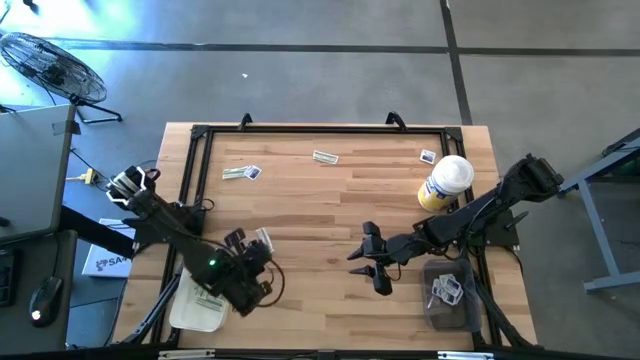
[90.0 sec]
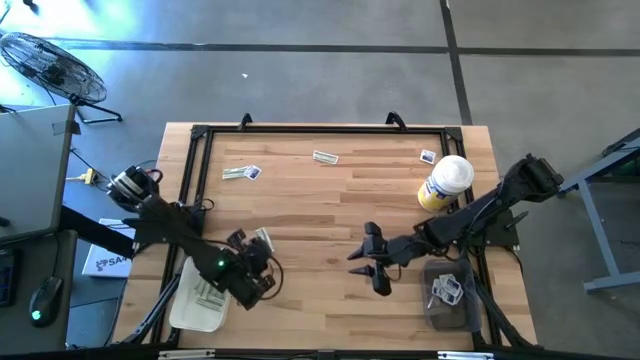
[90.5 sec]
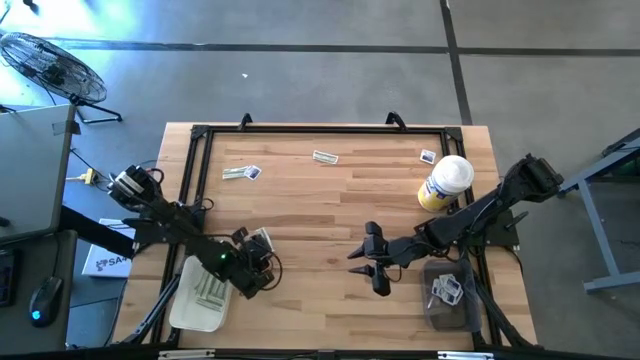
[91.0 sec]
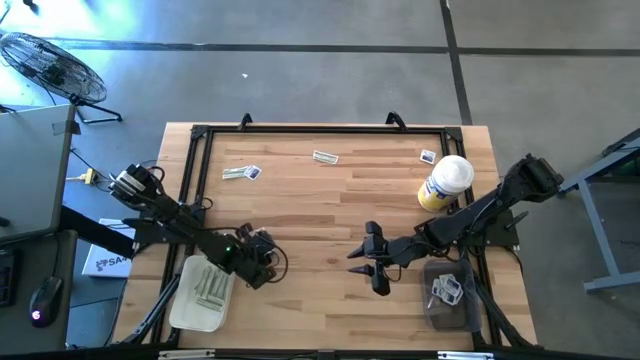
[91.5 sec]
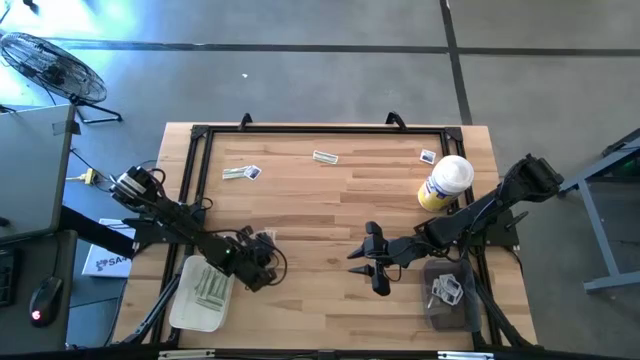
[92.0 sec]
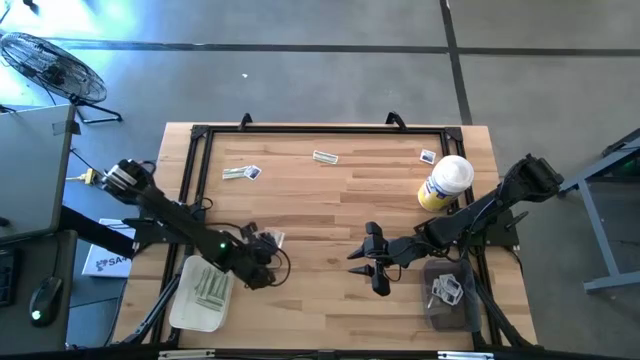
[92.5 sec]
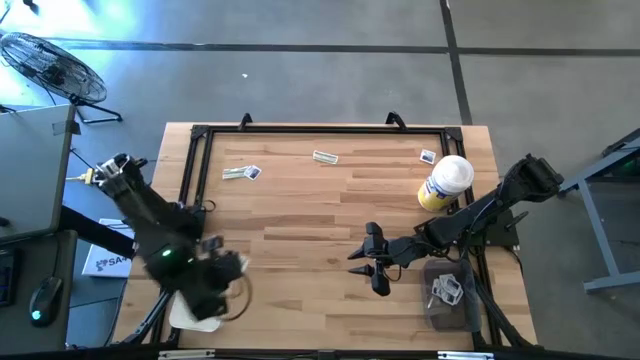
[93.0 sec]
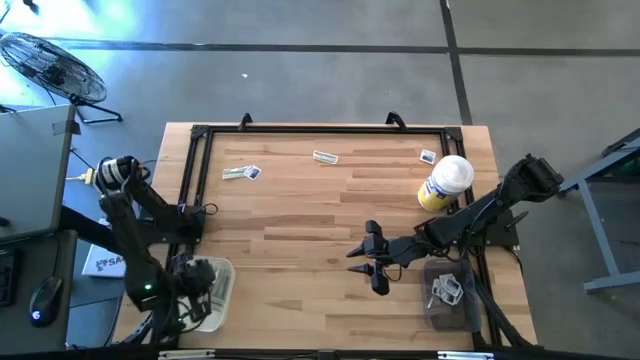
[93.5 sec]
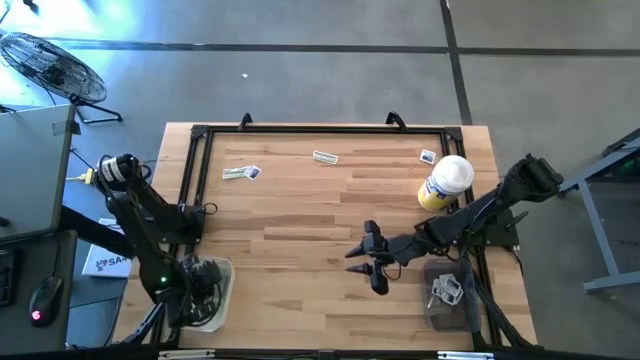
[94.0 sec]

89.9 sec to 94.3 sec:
Task: Pick & Place First Aid Supplies
Put the green bandage into the white bin

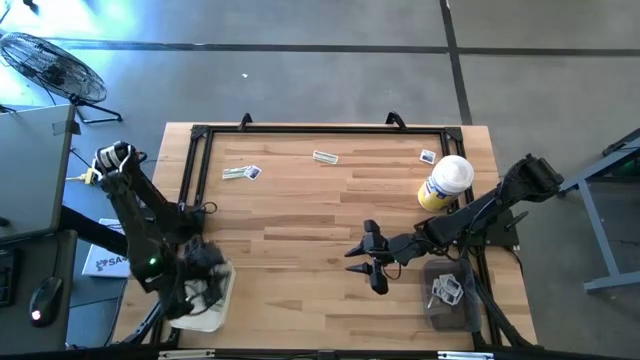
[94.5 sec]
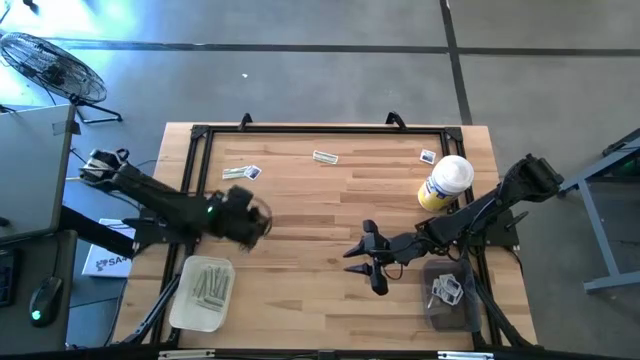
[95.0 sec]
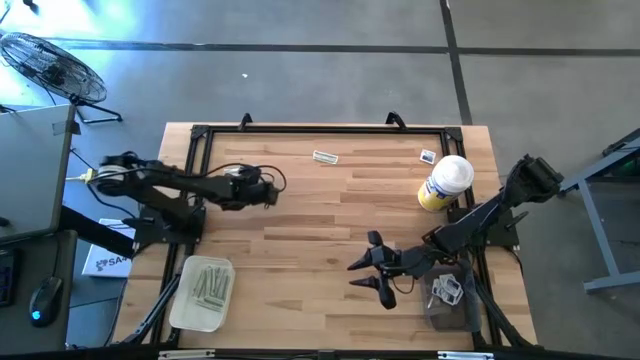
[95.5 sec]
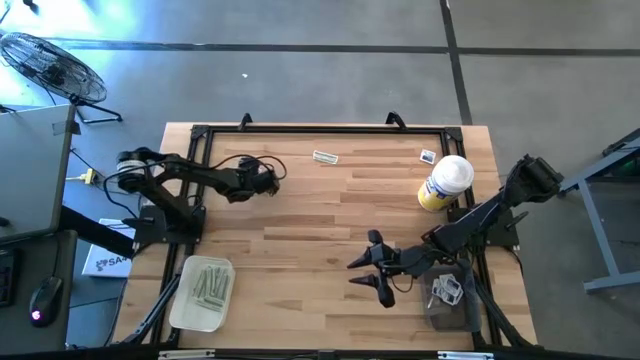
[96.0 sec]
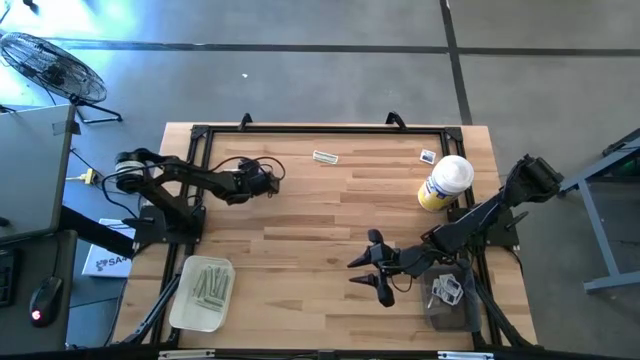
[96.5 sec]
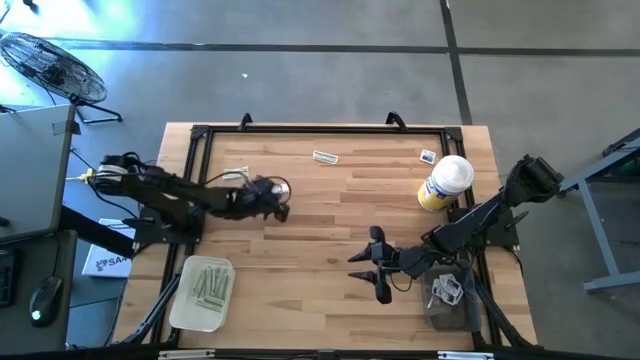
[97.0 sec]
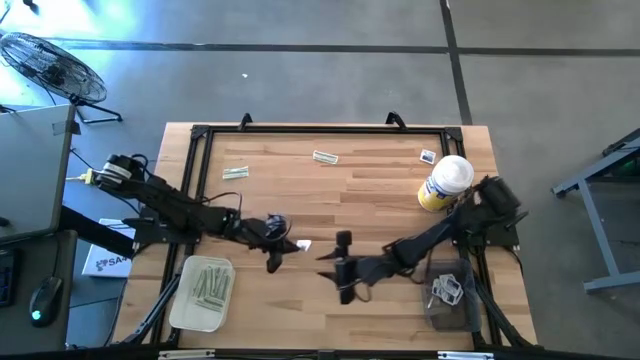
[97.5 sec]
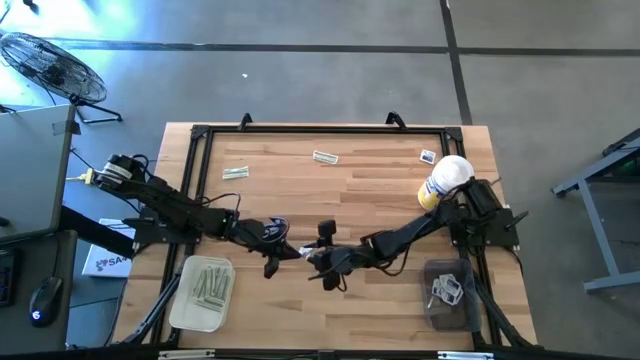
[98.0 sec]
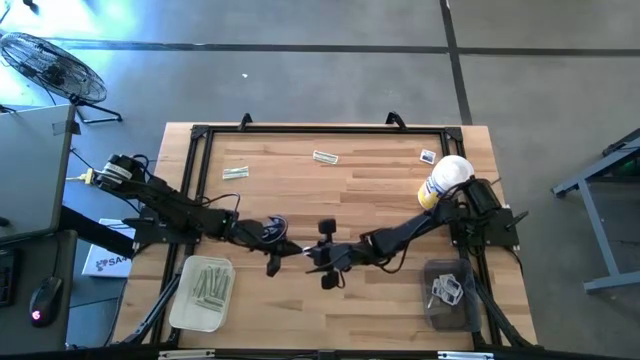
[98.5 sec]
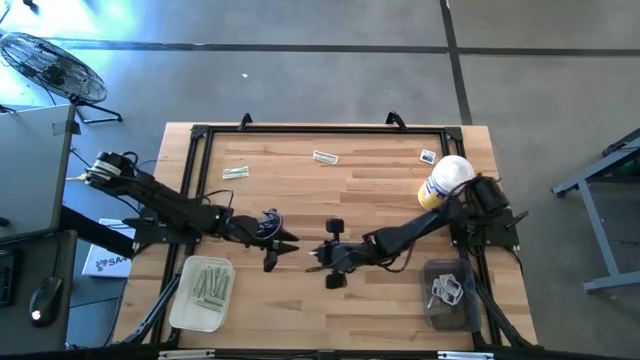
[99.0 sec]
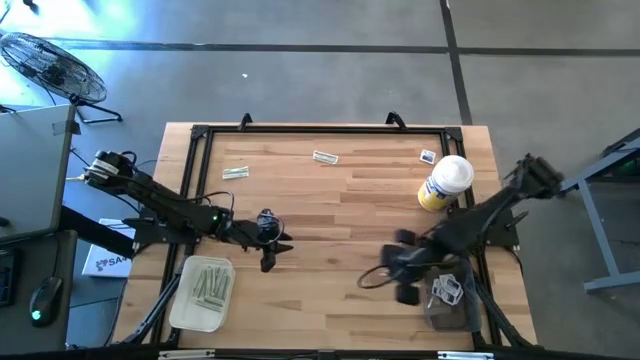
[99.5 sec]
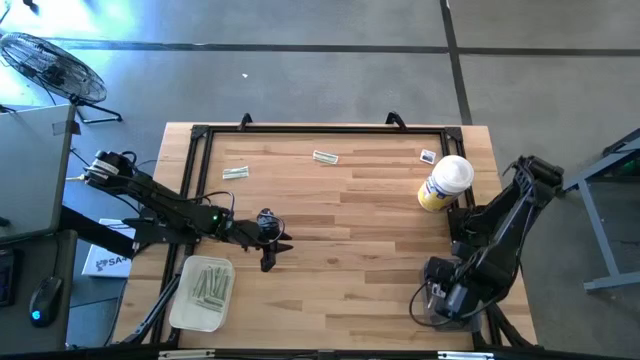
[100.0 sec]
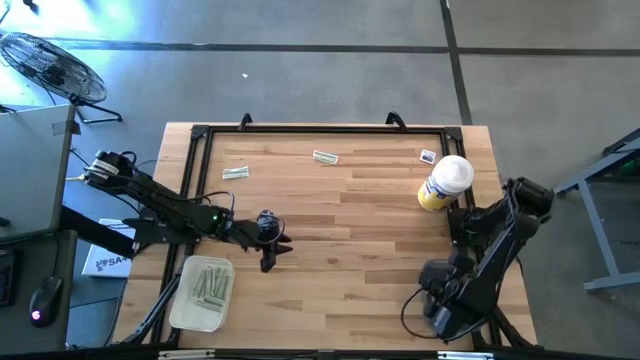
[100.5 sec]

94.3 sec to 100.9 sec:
Put the blue alcohol pad into the black bin

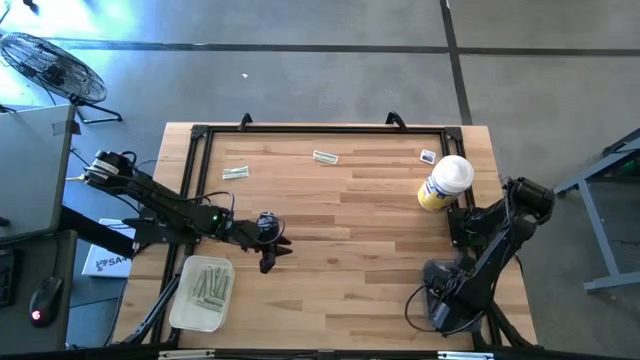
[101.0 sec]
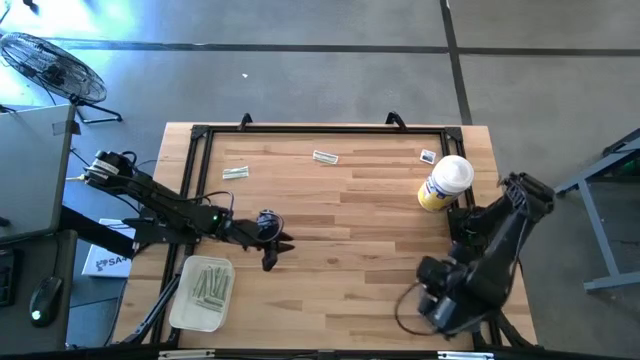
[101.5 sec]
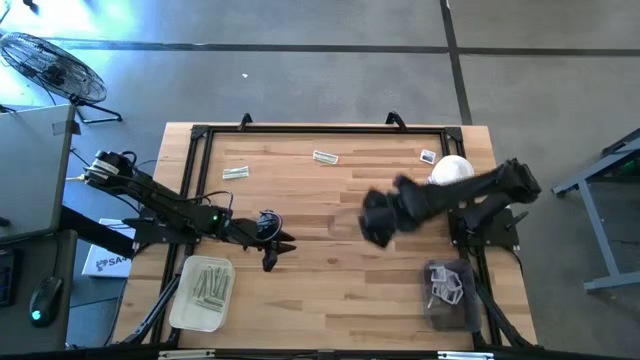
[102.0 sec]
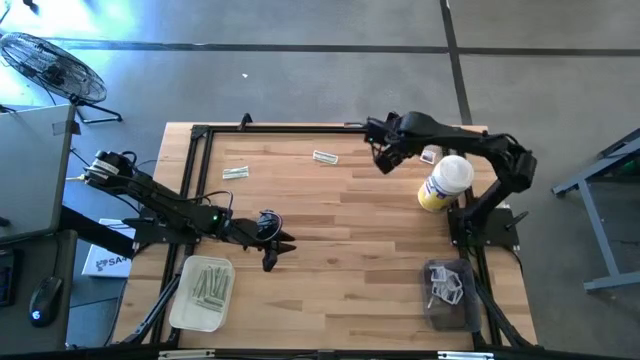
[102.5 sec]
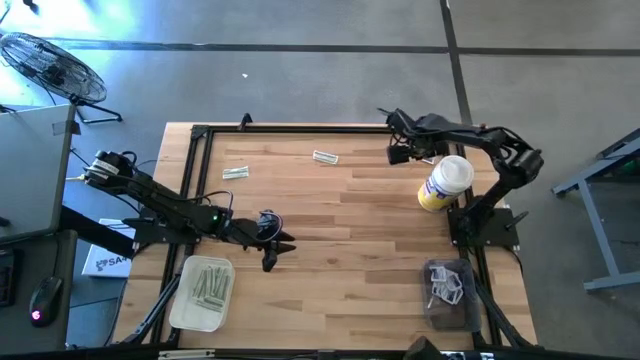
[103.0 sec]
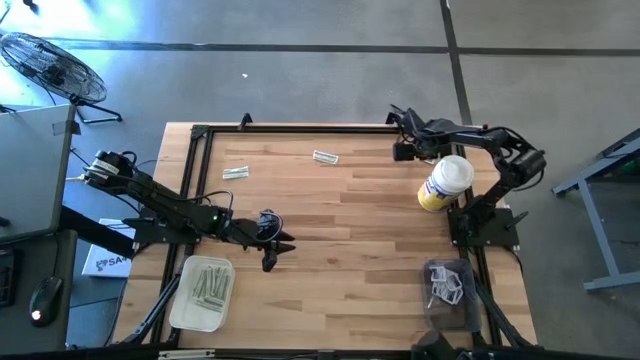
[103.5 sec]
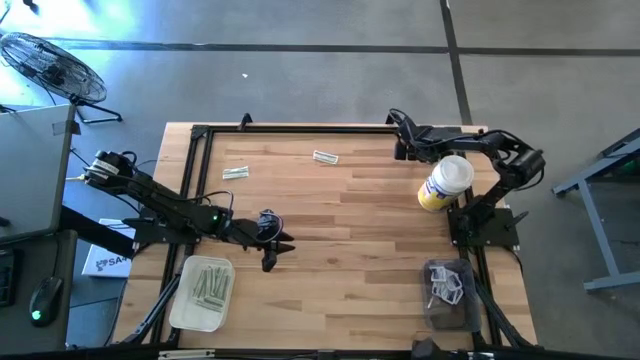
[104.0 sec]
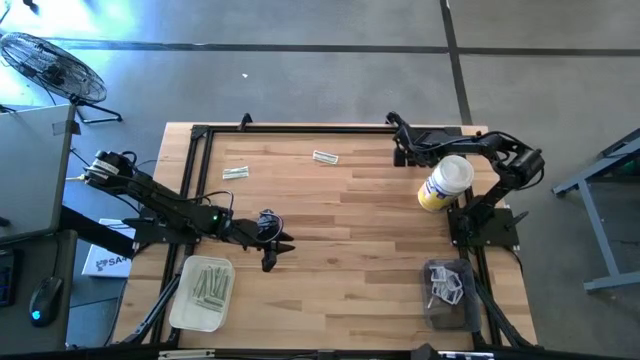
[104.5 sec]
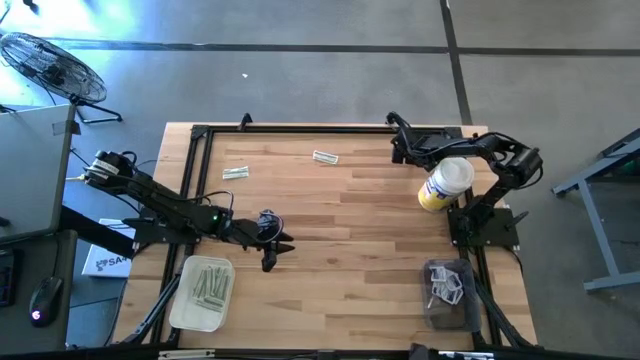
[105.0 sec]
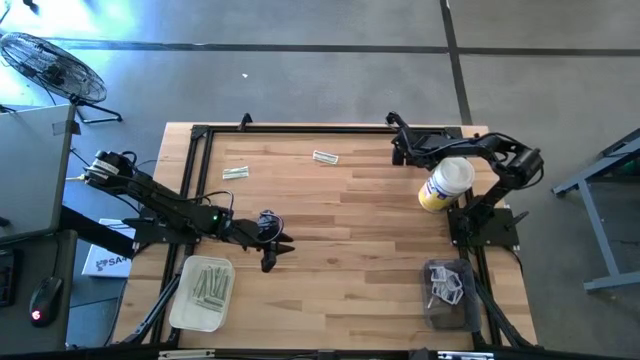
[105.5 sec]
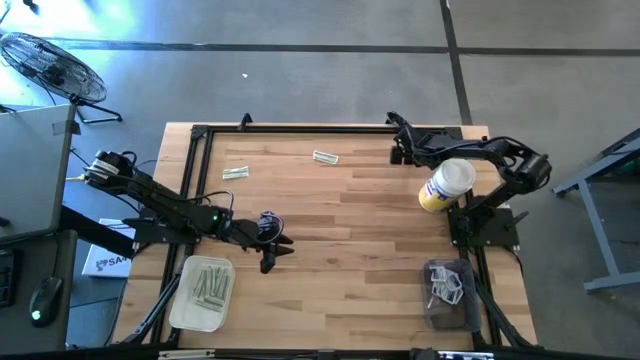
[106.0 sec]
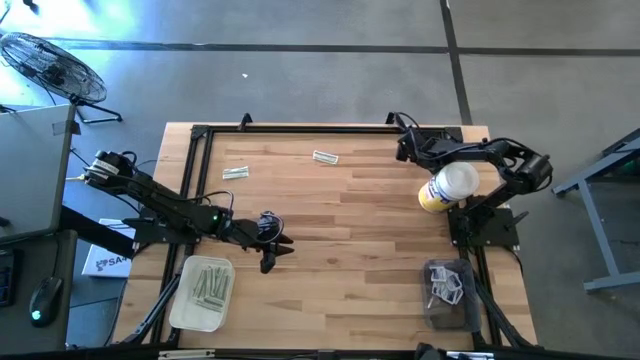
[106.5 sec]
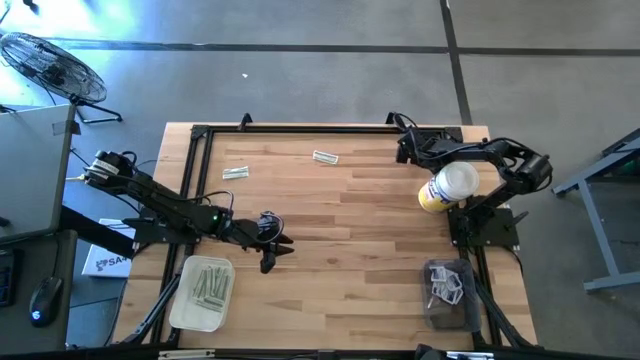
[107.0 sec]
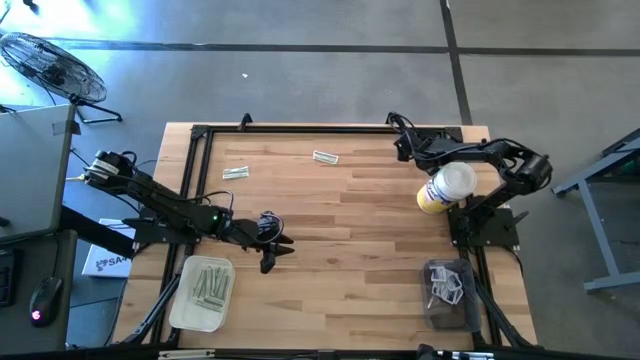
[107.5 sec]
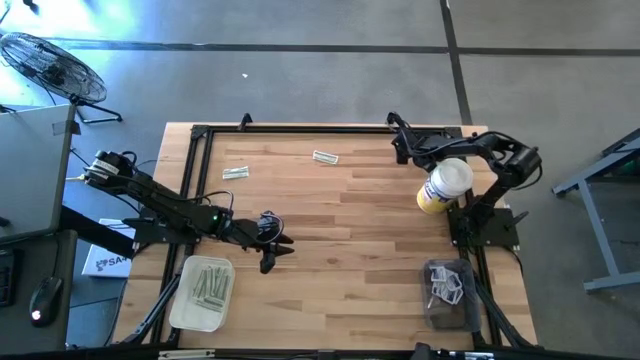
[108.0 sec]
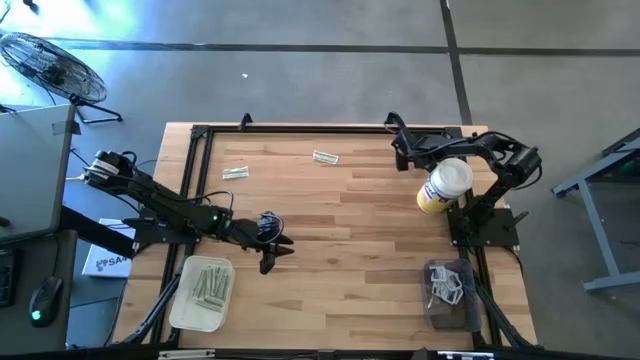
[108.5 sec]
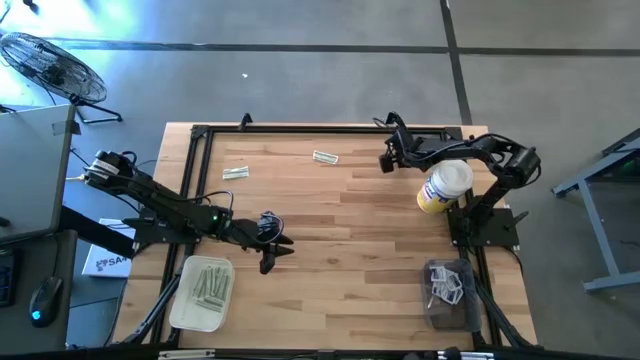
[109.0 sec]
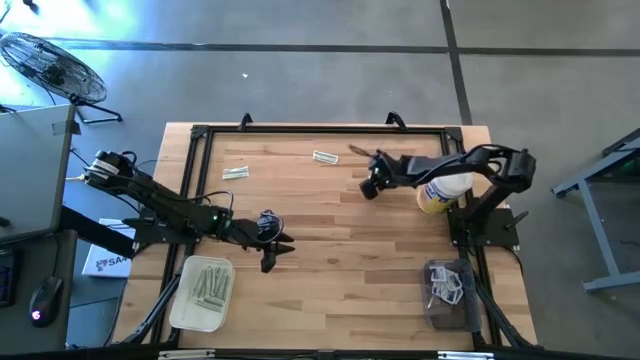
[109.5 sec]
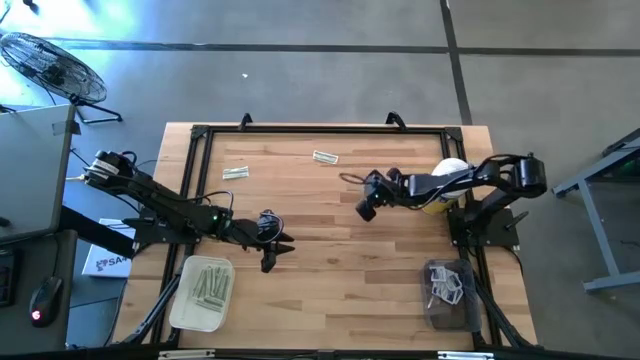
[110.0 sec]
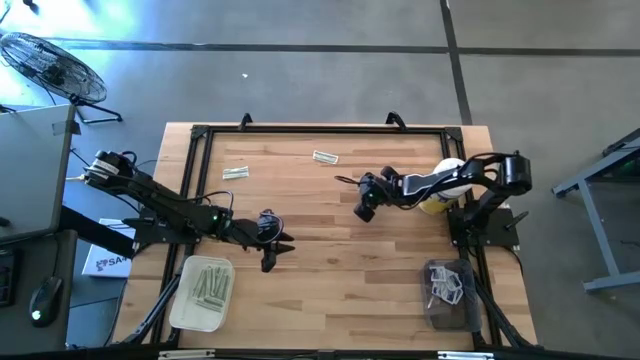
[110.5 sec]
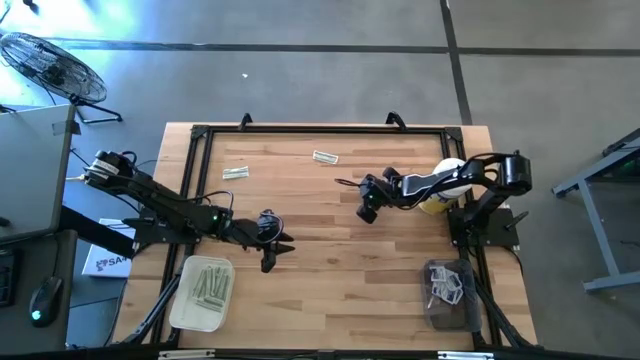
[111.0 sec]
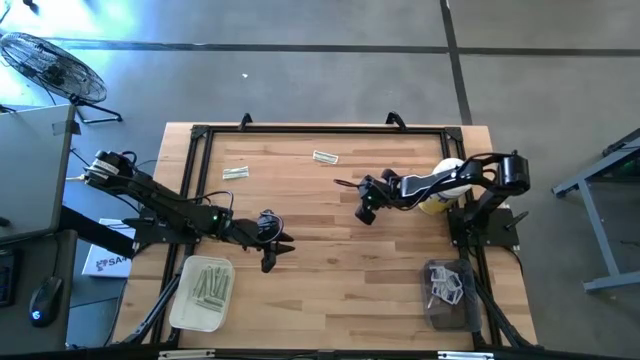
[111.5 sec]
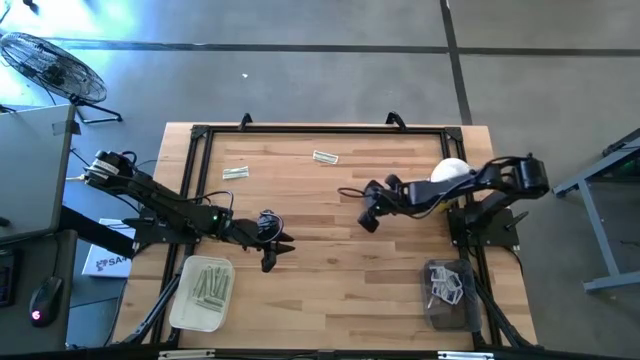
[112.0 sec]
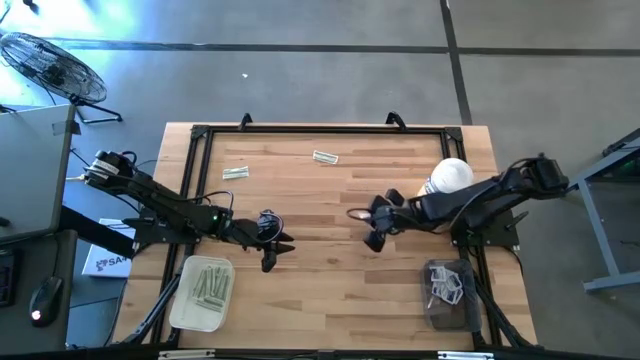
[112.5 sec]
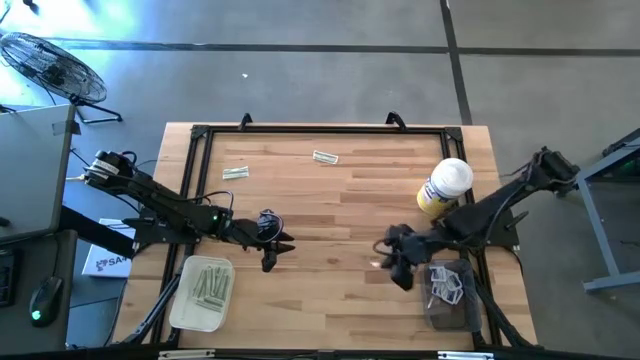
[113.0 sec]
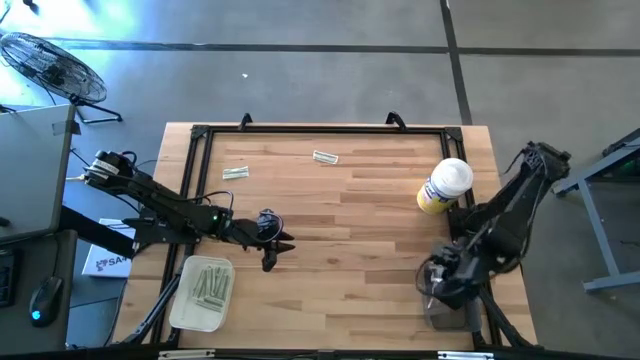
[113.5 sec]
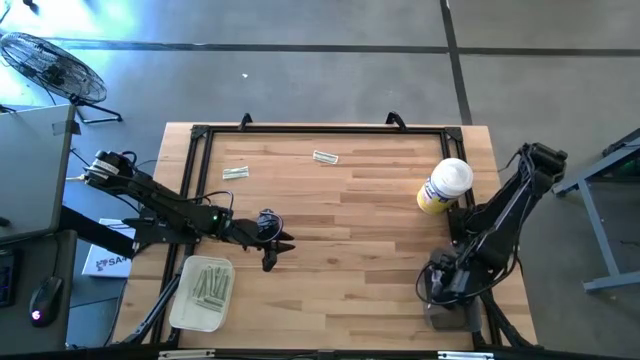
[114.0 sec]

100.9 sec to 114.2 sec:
Put the blue alcohol pad into the black bin
